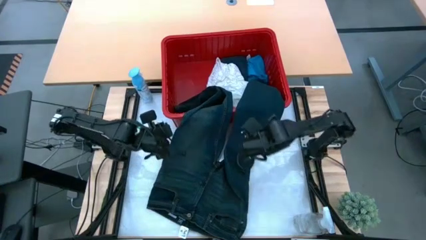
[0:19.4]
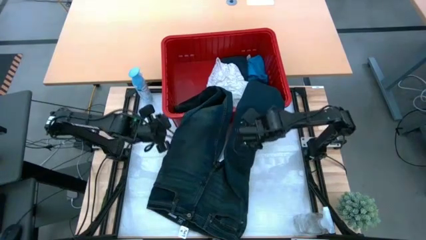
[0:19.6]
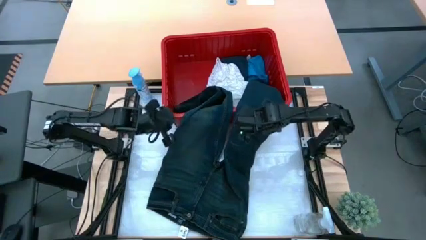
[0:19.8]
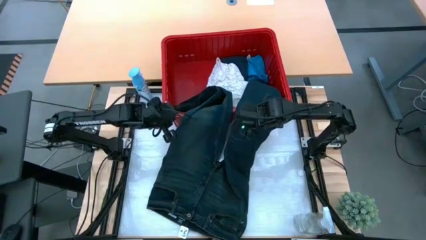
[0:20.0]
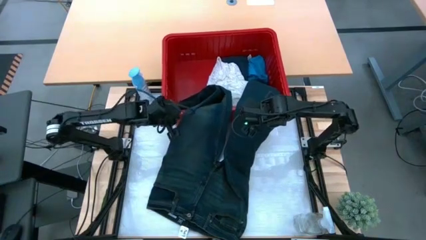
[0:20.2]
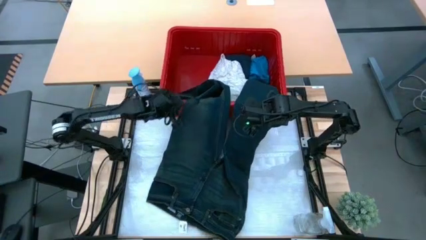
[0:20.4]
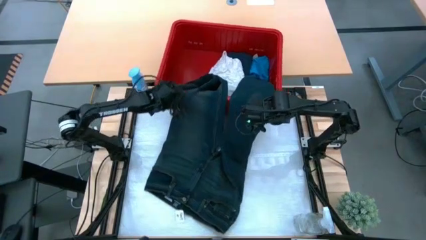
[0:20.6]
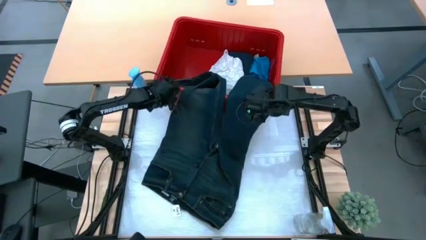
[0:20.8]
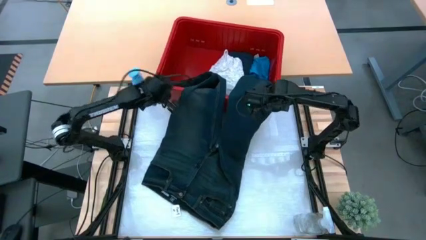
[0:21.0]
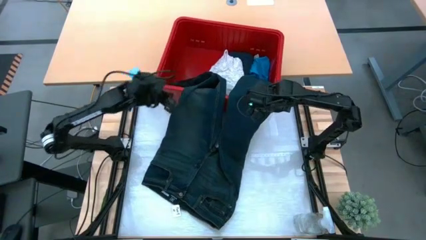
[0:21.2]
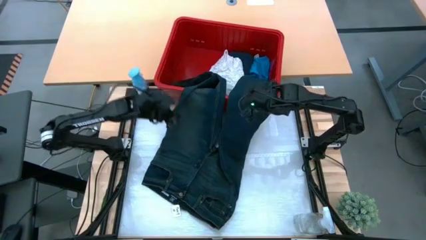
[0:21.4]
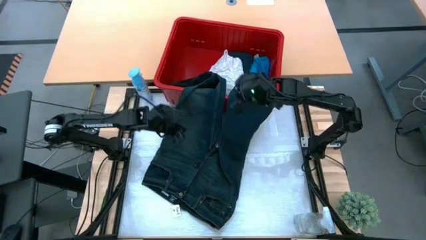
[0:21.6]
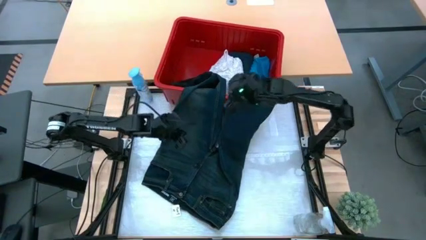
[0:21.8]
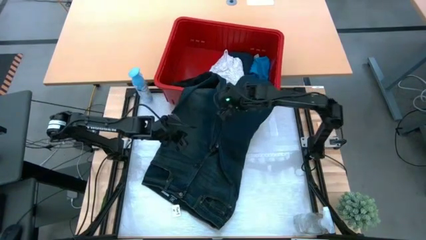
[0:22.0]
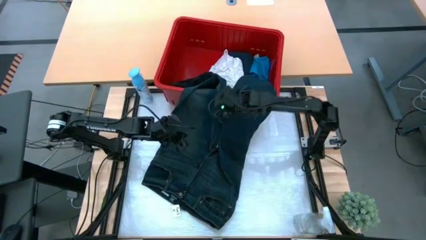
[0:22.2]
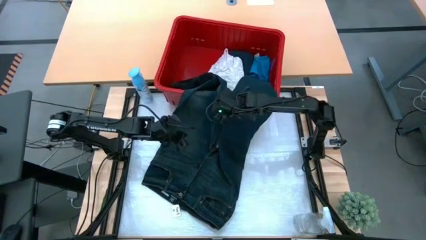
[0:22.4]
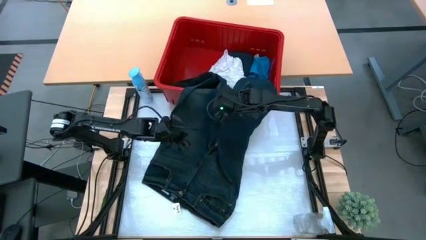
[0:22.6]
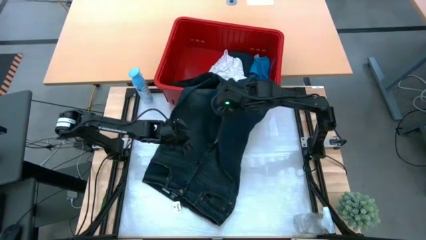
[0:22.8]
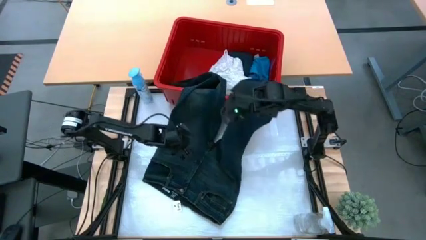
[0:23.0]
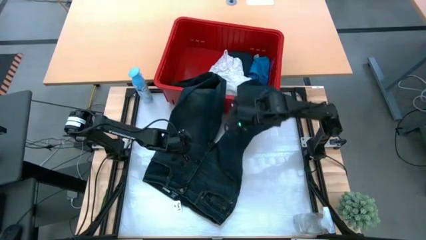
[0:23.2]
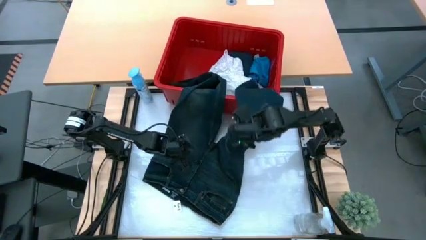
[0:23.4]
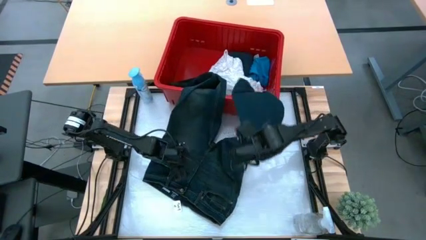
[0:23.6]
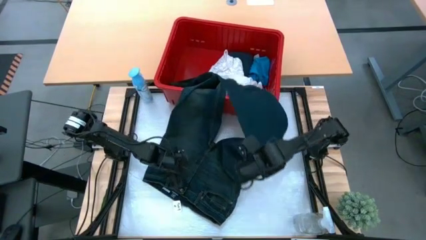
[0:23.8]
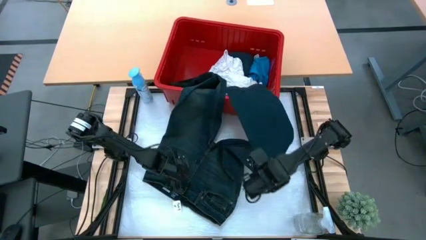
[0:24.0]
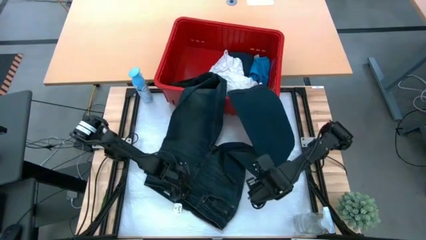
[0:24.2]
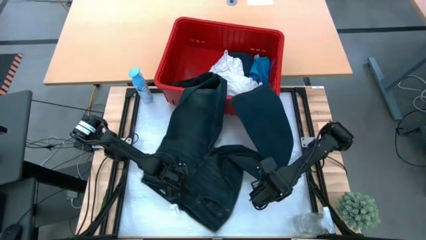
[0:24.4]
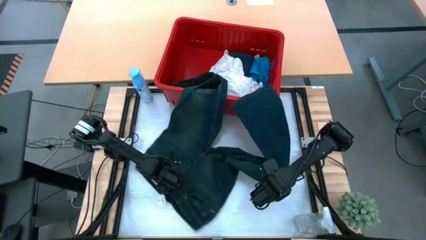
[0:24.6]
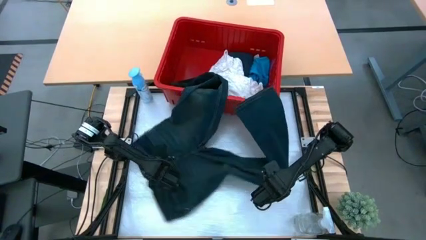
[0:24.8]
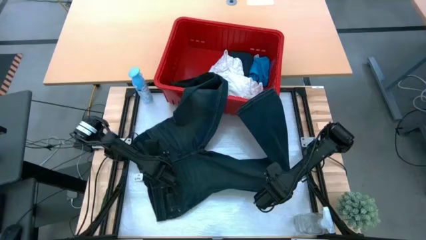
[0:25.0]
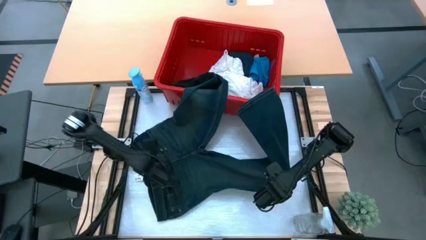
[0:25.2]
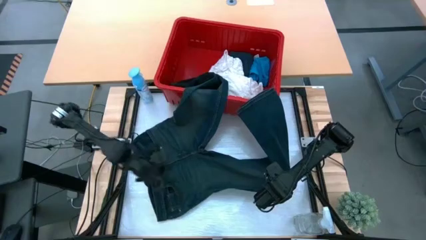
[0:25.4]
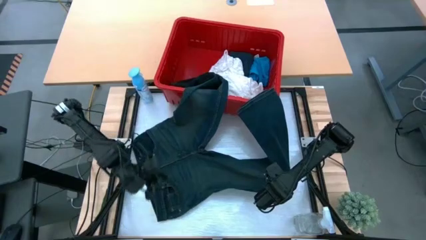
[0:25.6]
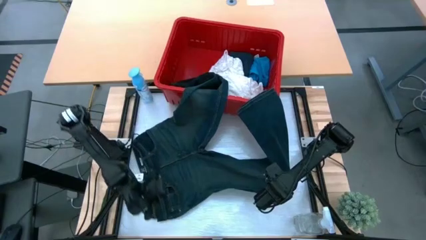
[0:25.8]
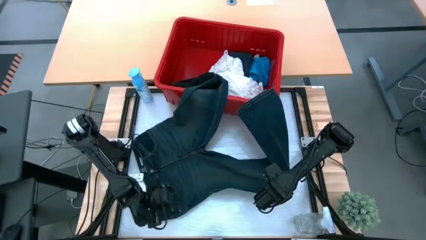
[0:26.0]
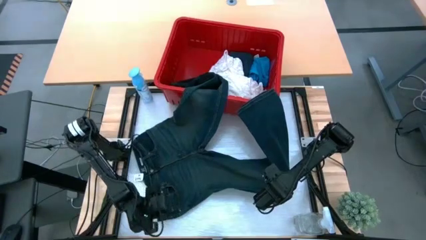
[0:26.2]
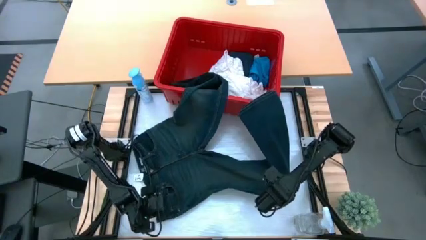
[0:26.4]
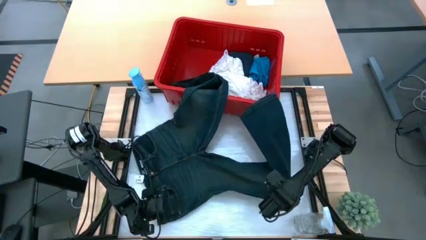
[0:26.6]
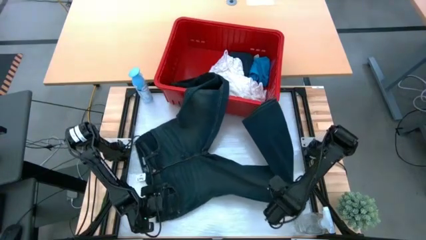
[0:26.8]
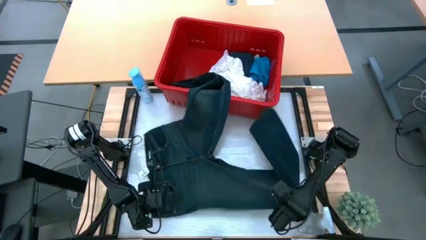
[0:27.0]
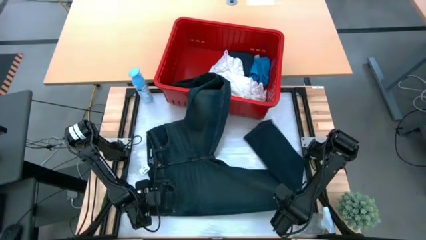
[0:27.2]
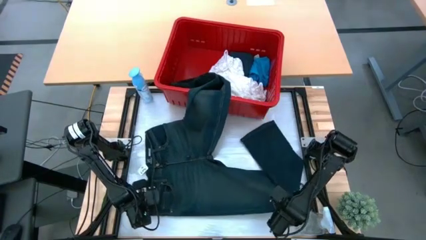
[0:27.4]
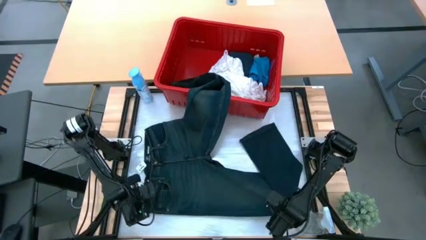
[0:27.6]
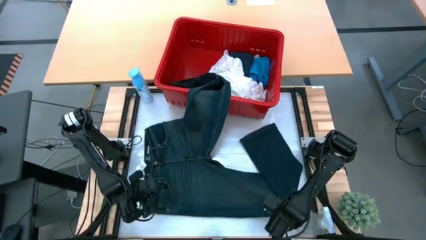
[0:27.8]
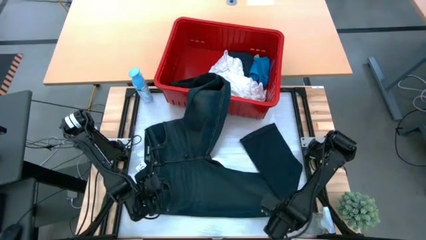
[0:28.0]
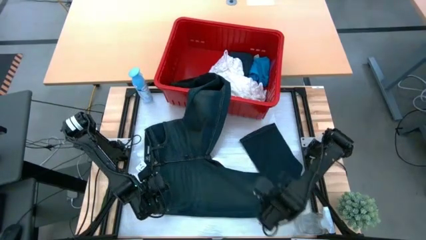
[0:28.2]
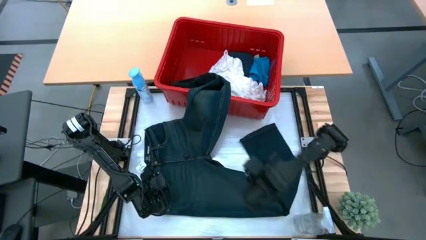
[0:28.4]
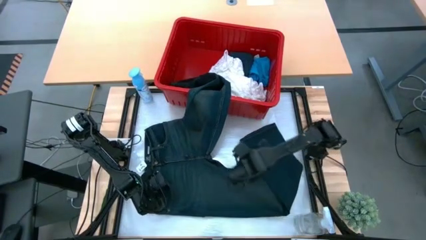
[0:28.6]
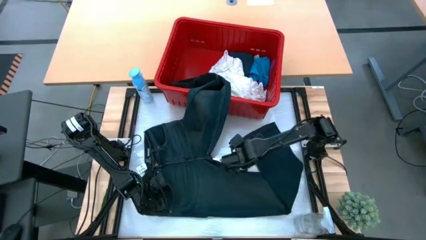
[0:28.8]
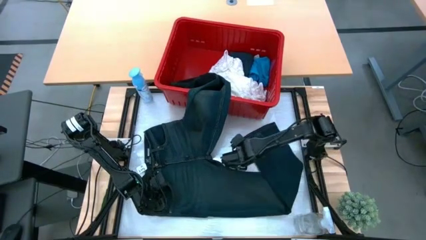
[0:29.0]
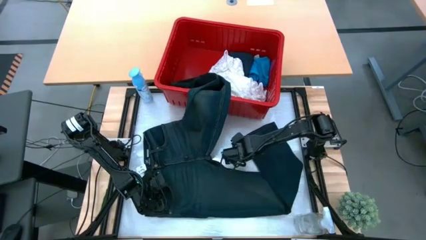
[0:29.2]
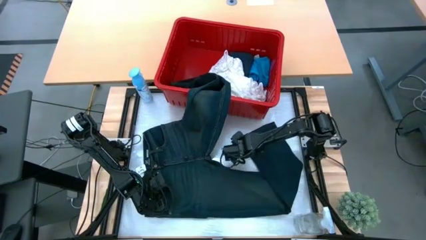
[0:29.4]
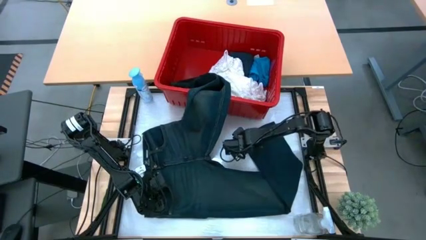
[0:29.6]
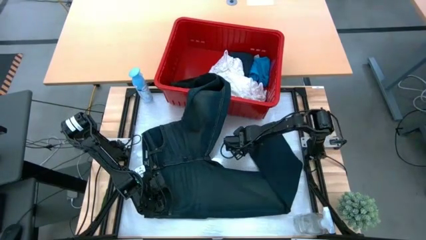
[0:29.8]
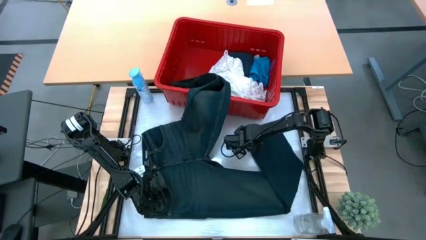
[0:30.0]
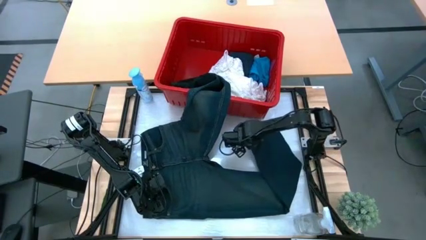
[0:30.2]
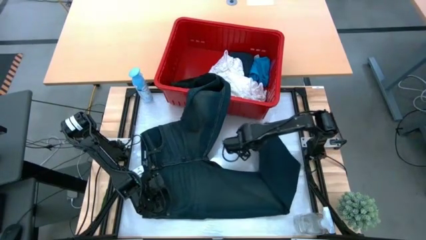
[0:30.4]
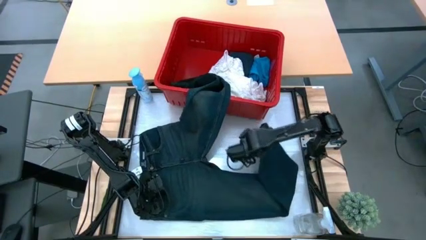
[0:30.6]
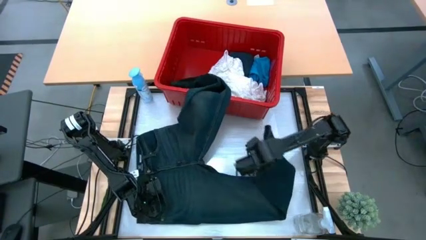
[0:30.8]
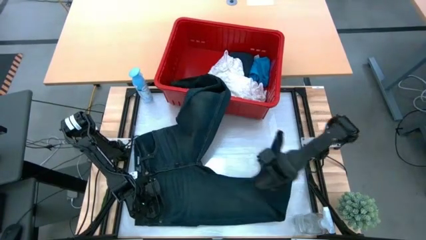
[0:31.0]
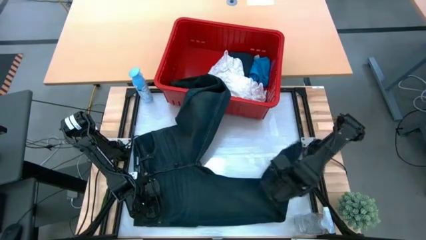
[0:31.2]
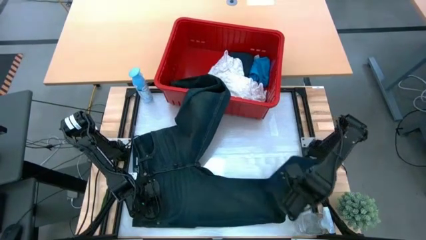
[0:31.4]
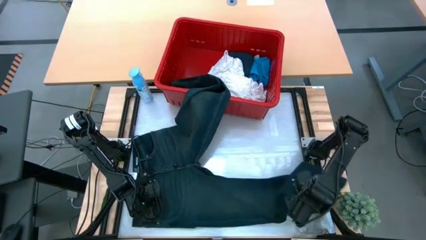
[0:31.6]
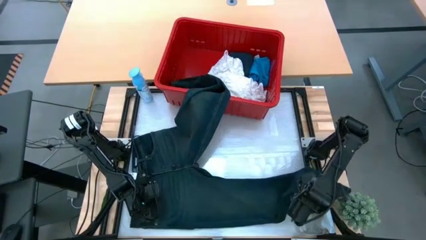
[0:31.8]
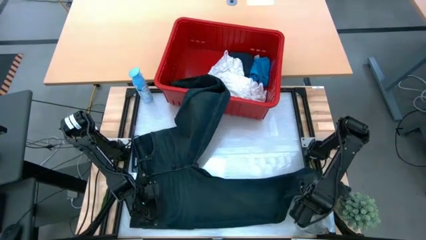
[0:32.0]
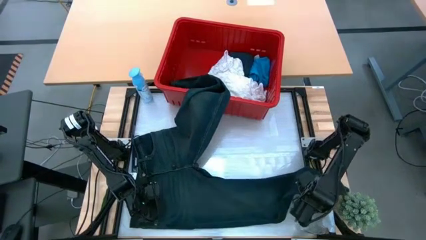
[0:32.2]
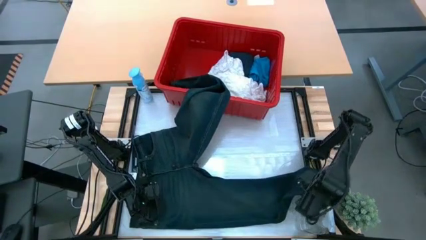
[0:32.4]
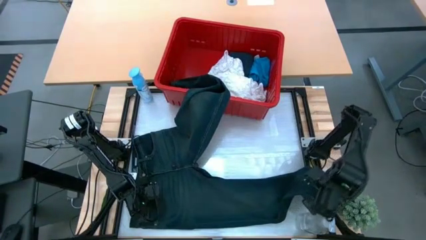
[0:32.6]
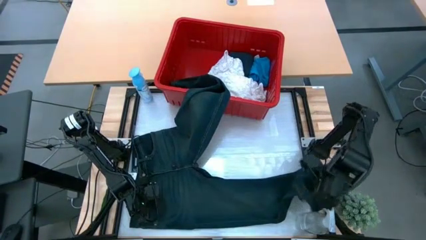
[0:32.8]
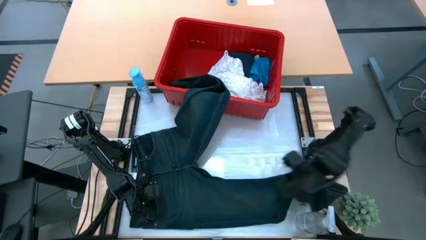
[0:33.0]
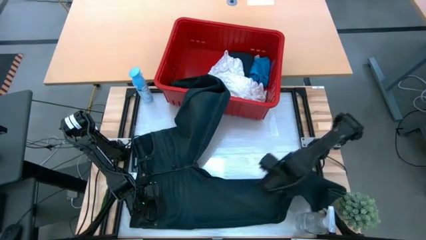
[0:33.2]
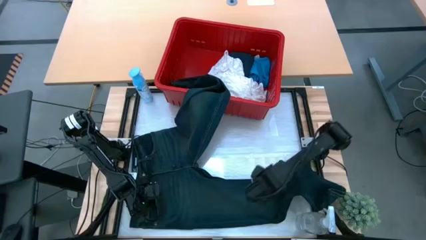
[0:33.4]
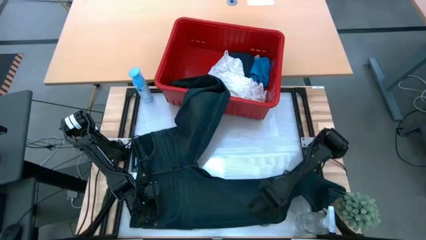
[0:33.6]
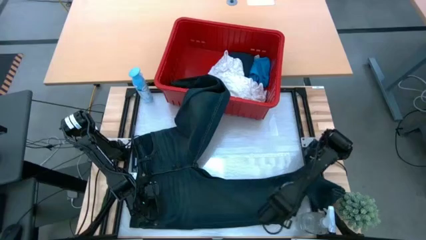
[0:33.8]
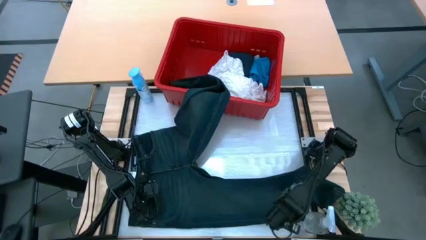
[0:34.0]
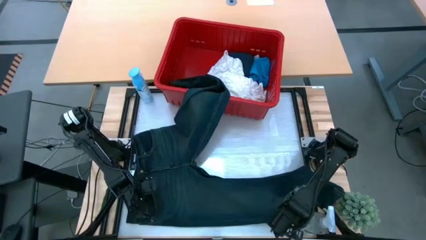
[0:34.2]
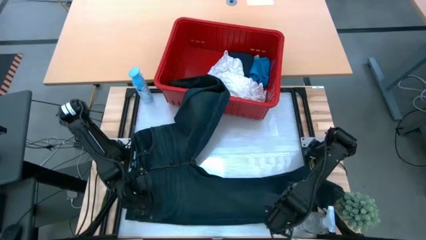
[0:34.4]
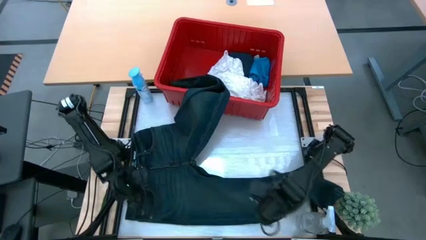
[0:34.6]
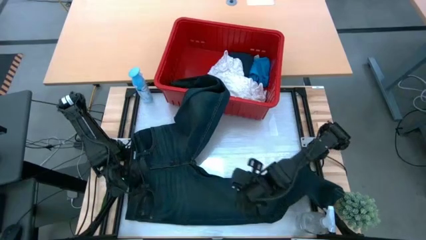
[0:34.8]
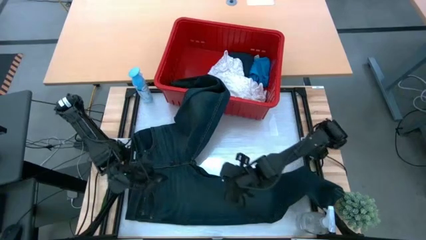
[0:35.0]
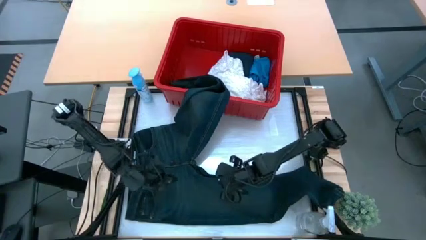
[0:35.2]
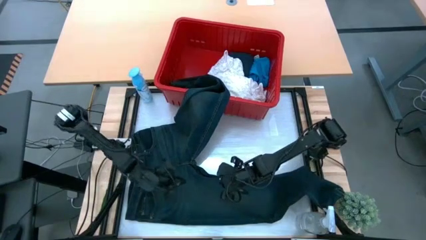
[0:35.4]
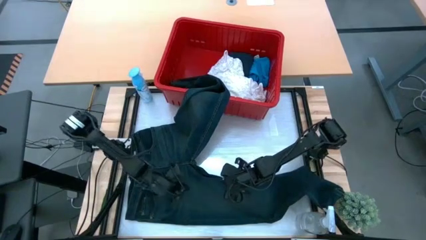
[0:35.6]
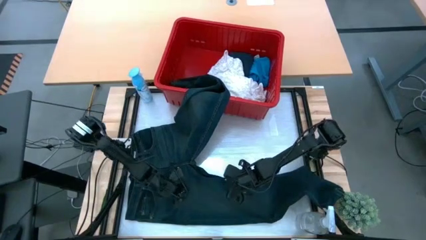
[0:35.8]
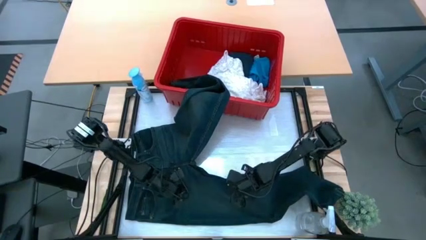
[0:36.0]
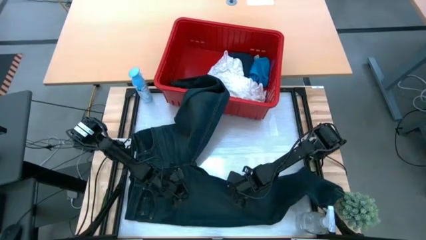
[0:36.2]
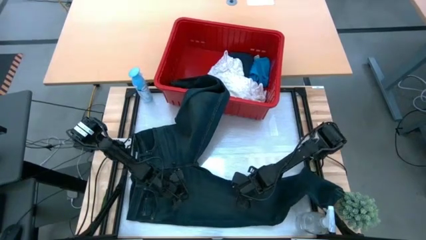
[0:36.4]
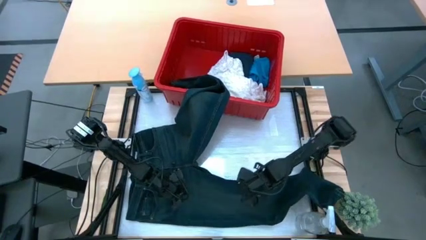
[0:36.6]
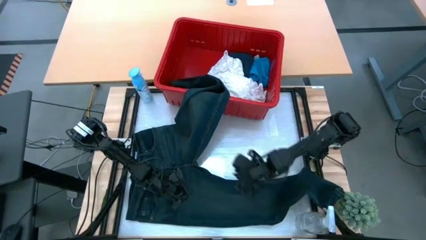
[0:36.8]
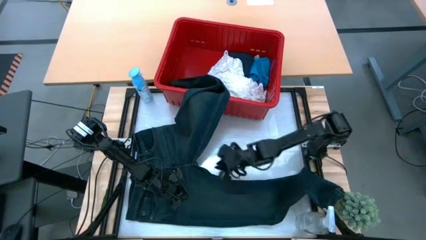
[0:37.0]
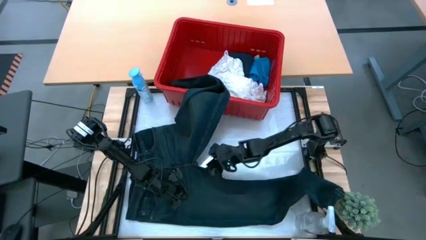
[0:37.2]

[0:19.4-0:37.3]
Task: Fold Laundry from Bin
Fold the black pants from the red bin
